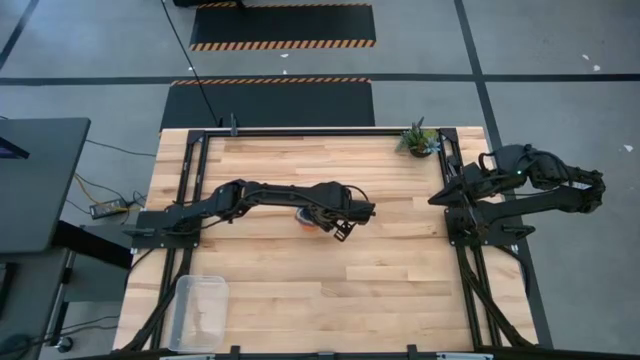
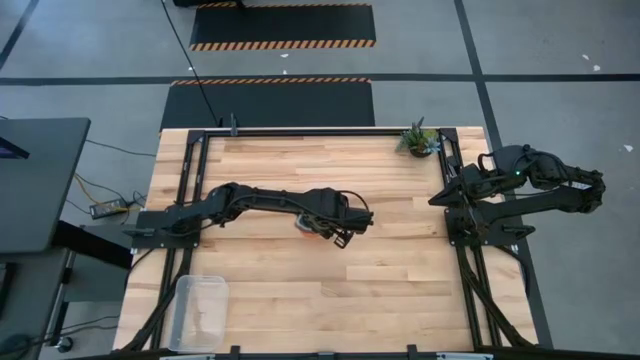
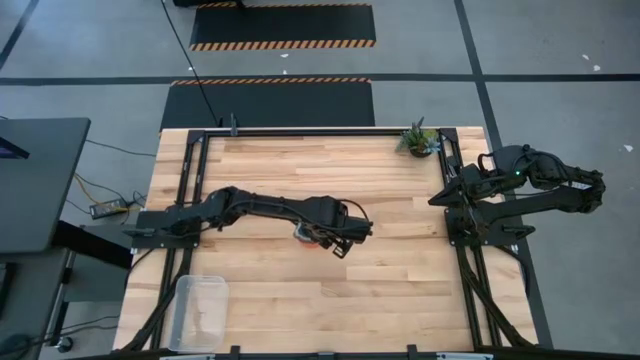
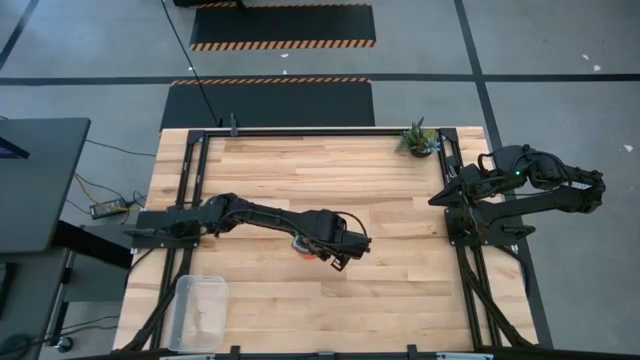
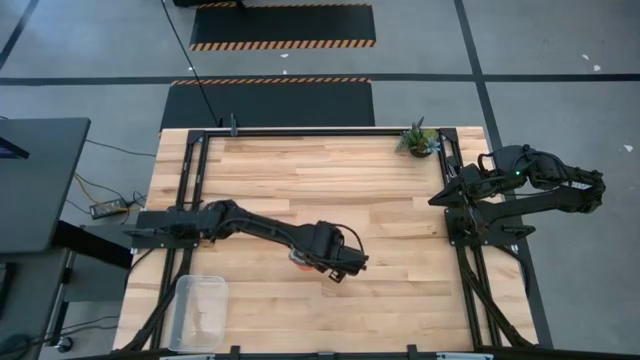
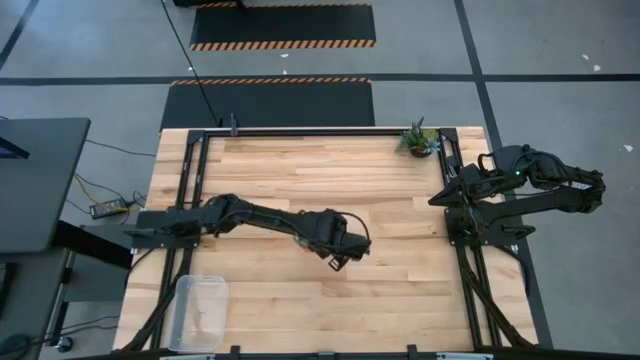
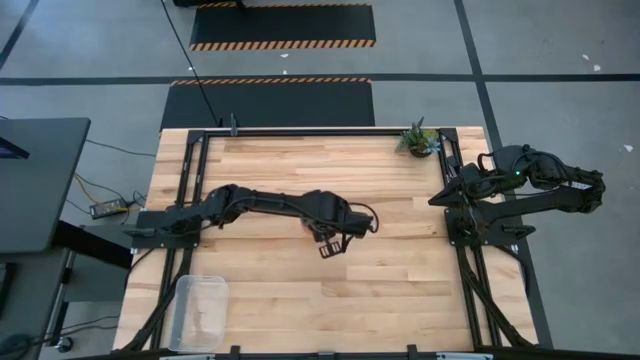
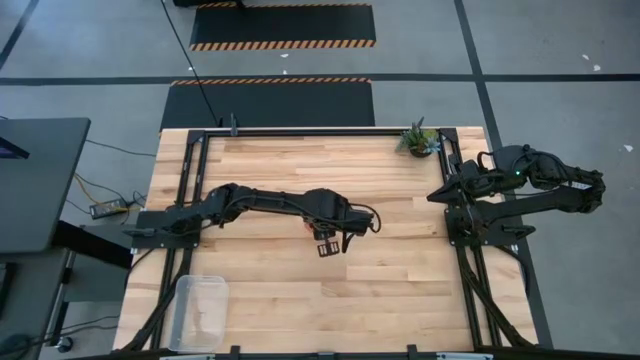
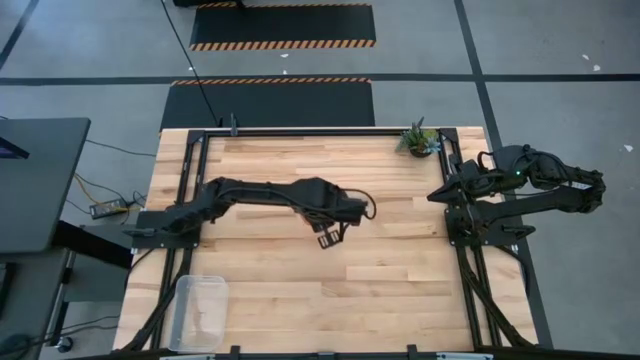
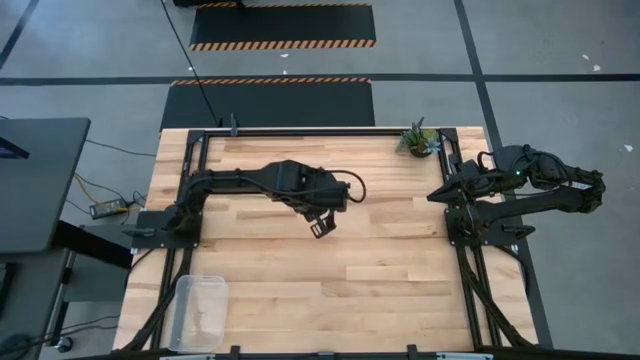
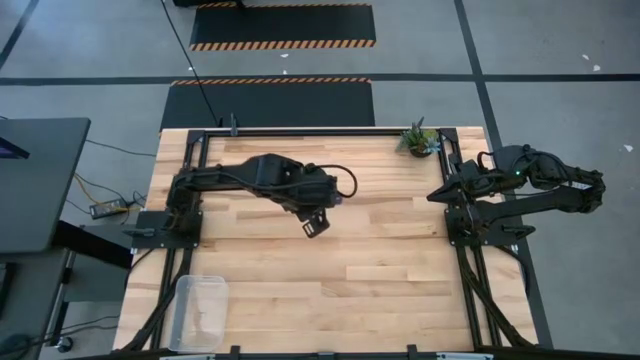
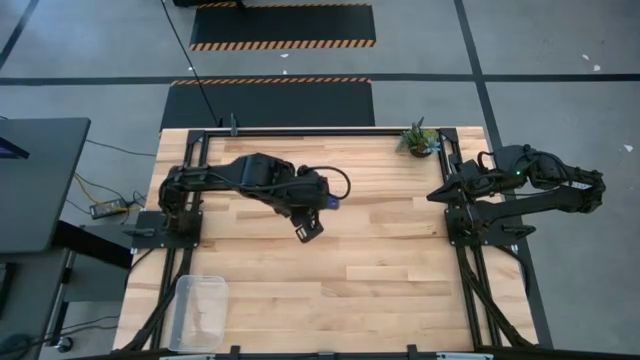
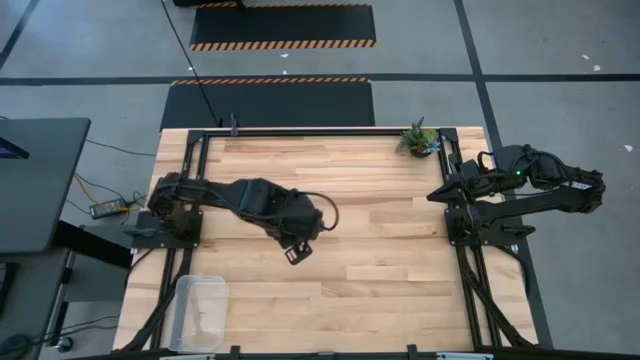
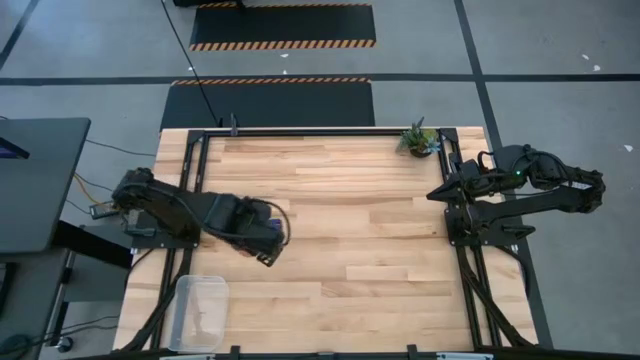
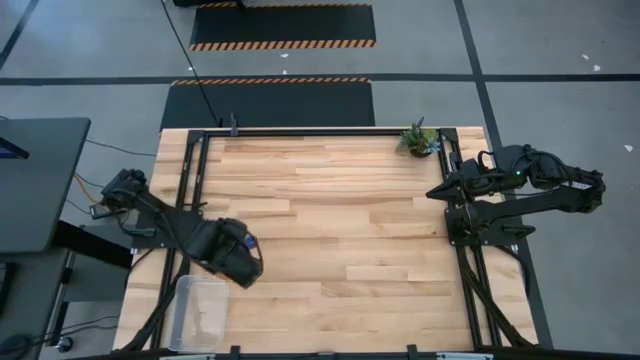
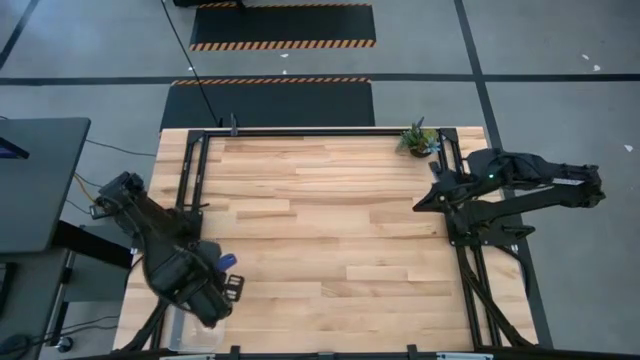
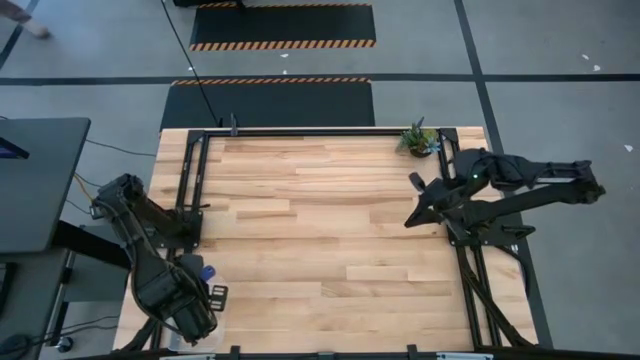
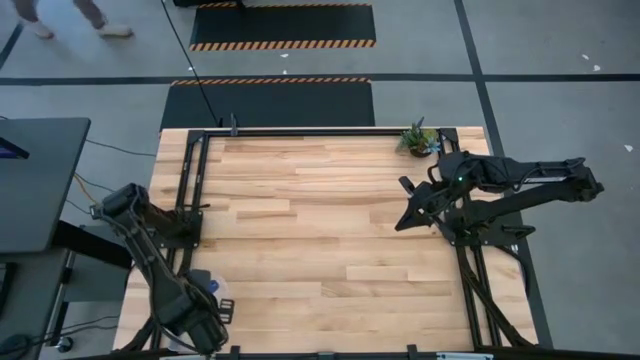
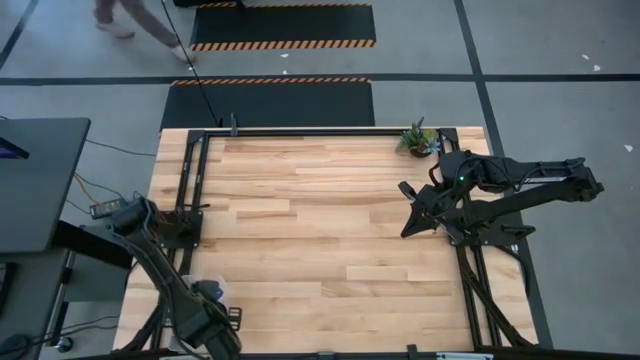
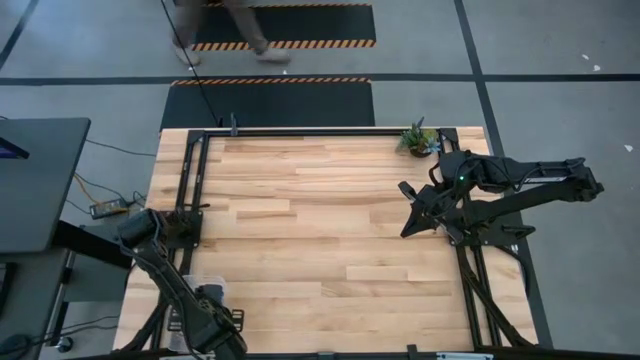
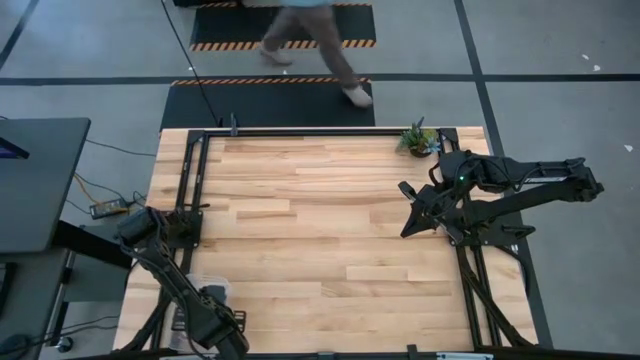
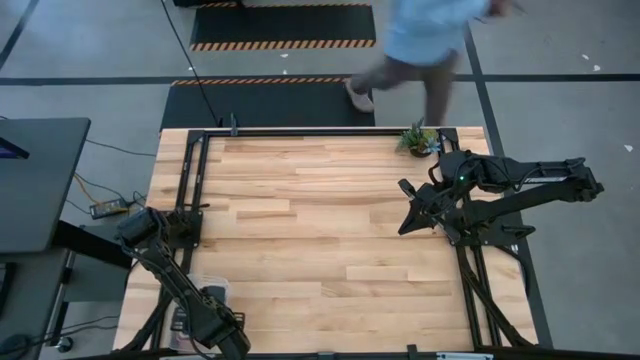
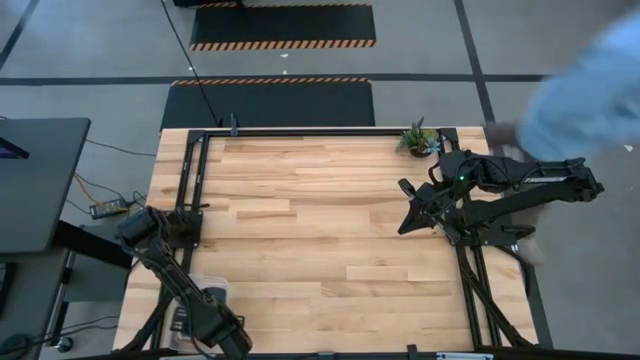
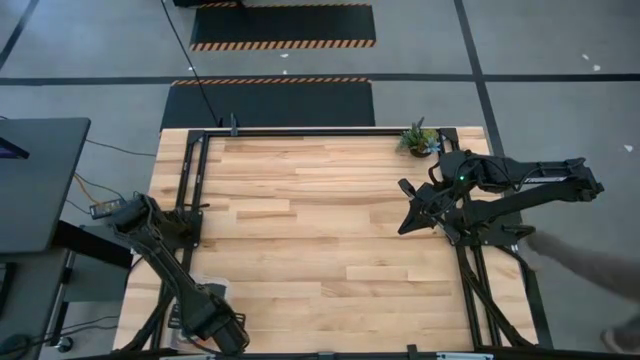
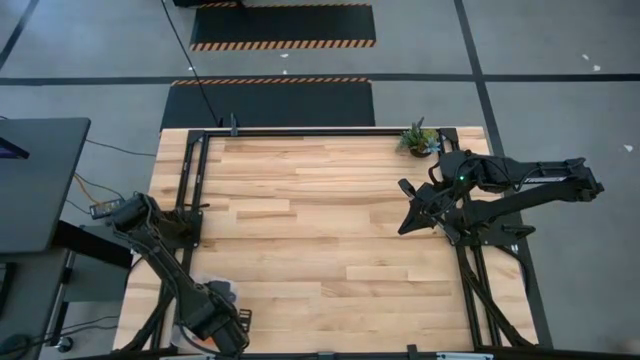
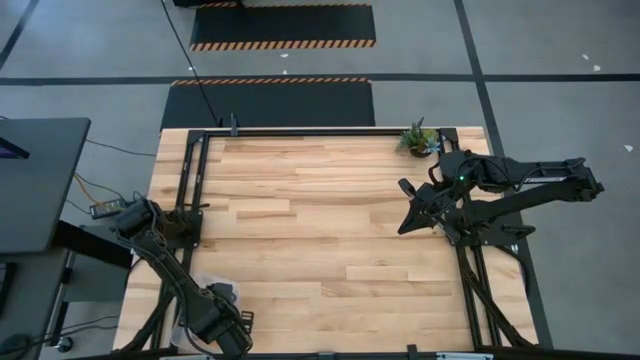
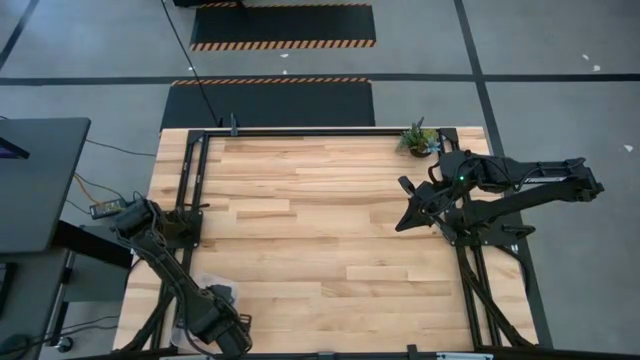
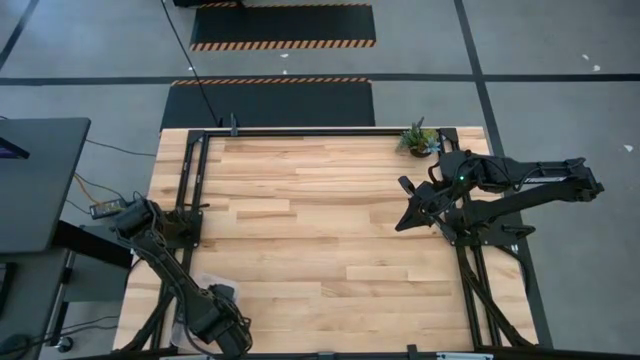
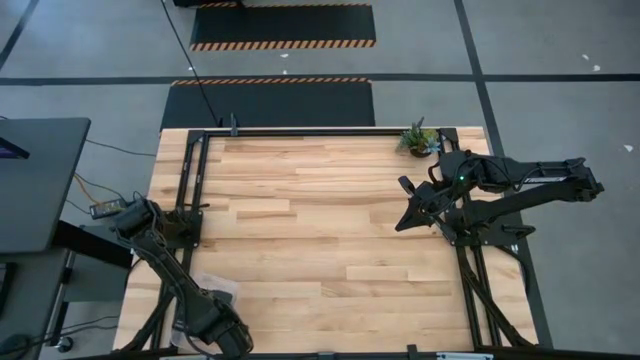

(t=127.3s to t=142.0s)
Task: Nest measuring cups in basket
Put the stacked measuring cups into the transparent bin

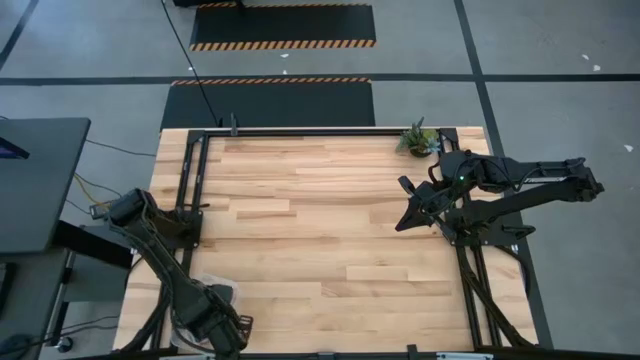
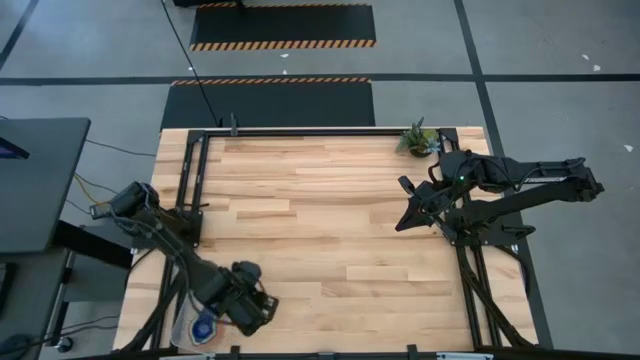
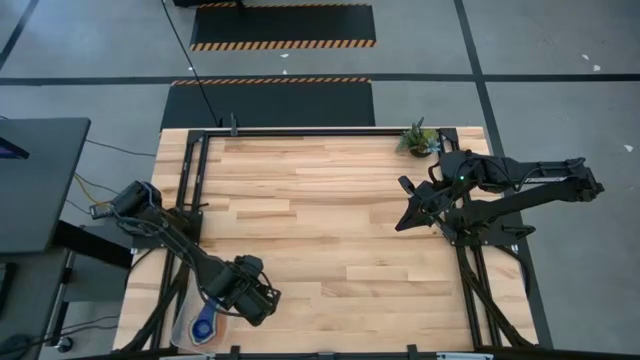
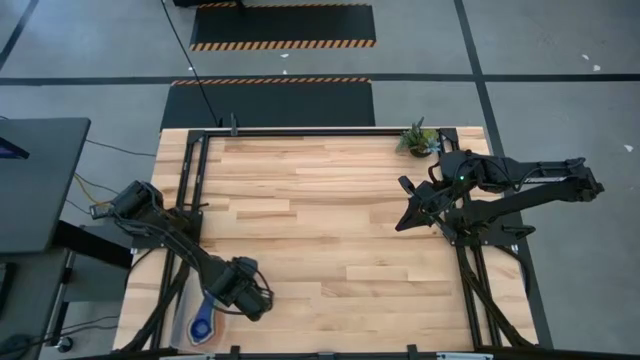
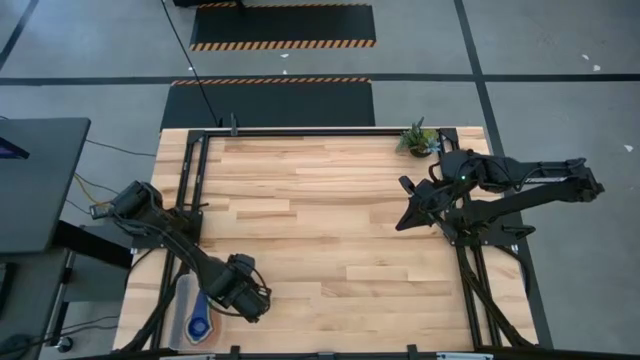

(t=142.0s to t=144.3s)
Adjust the transparent bin

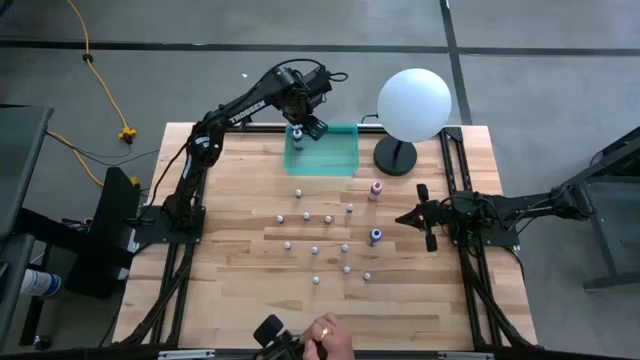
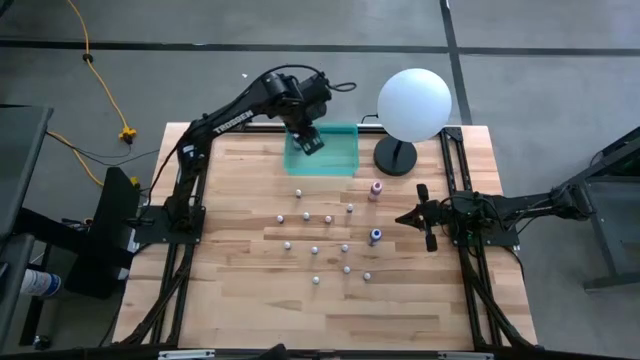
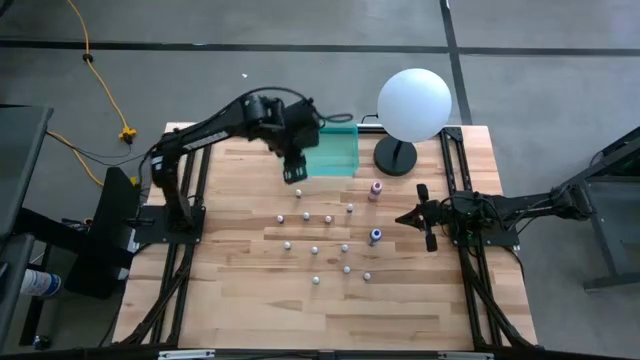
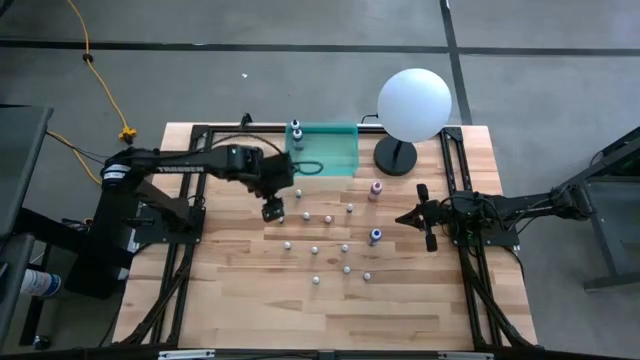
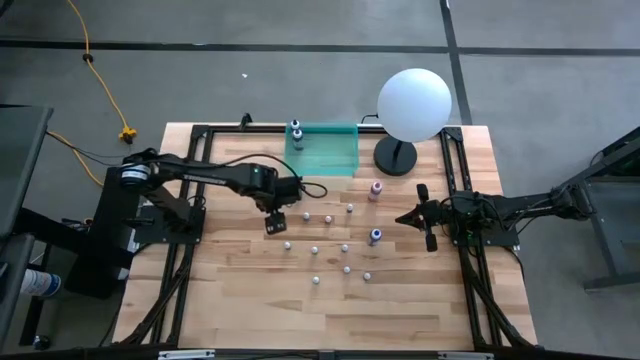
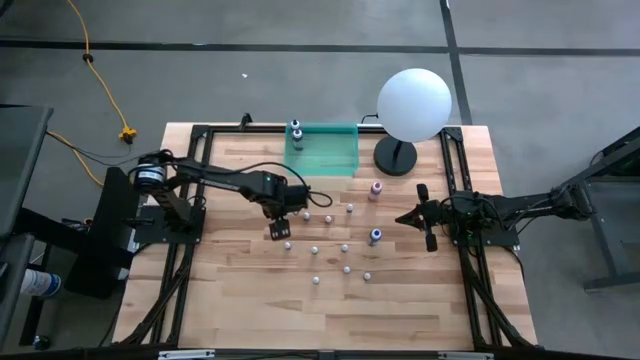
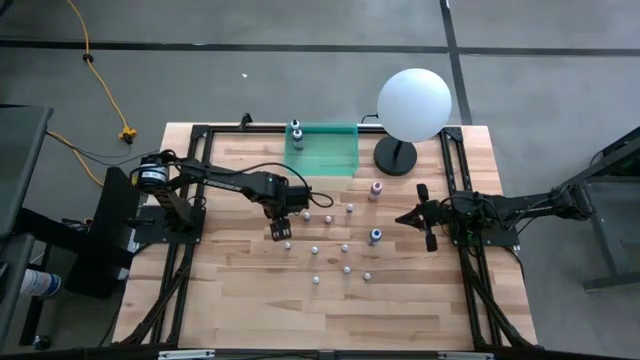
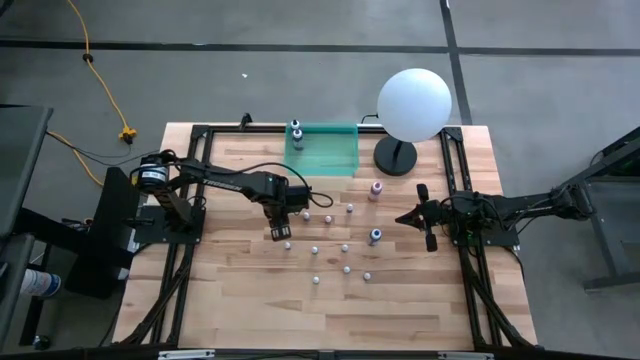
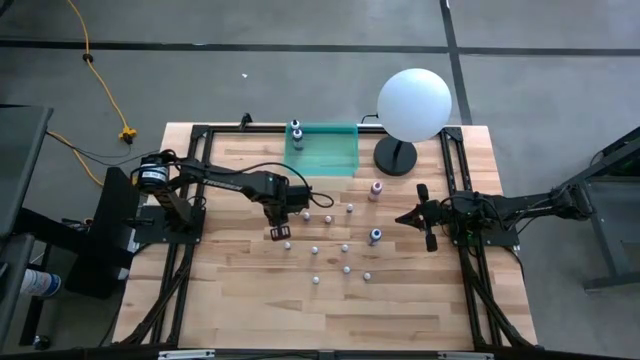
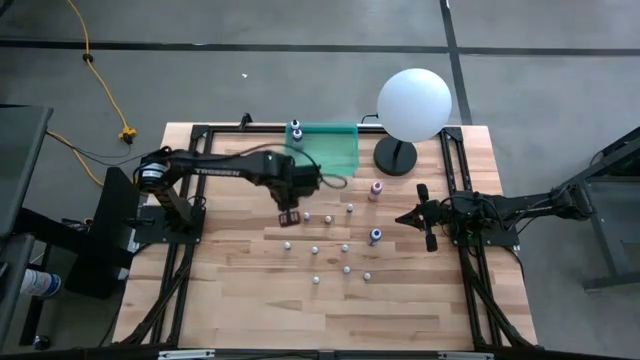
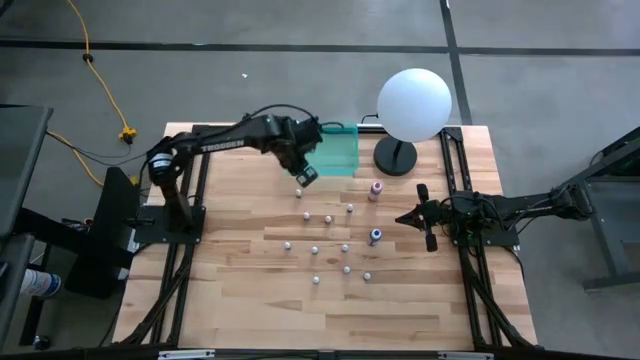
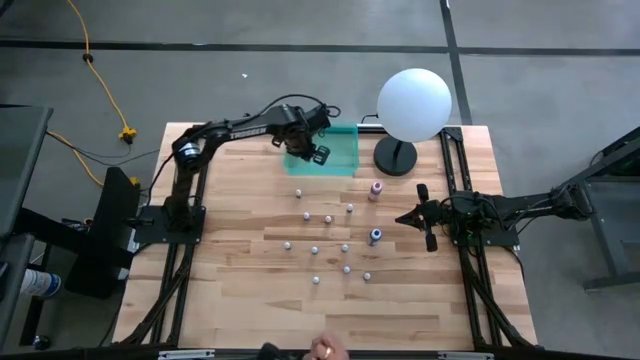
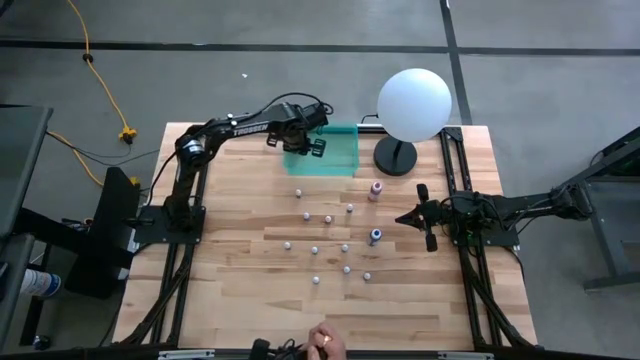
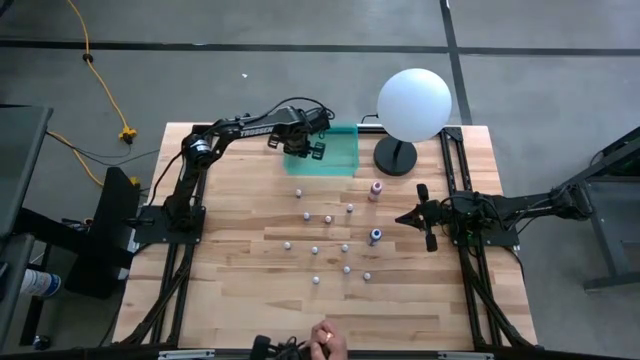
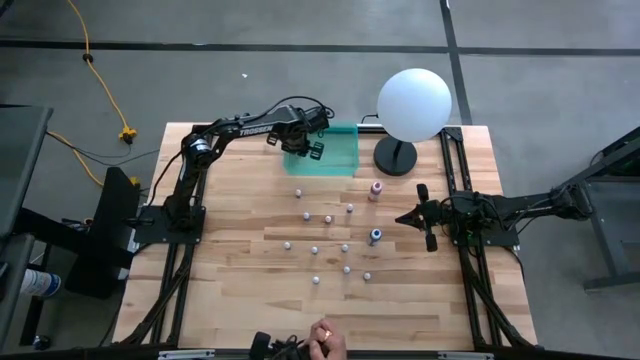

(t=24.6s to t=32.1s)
Task: Pick & Place food coloring
Put the small black food coloring bottle into the bin
